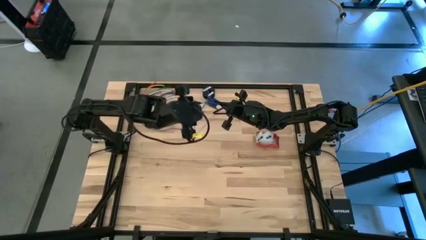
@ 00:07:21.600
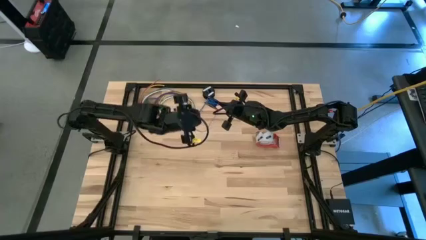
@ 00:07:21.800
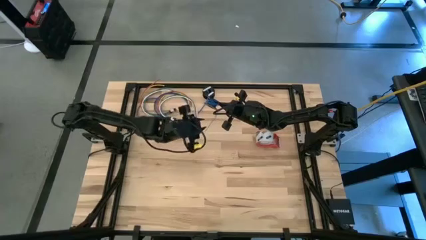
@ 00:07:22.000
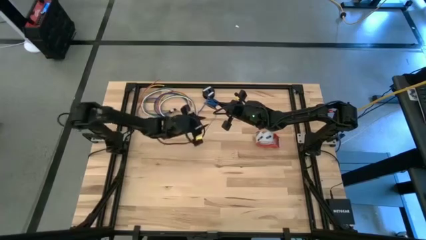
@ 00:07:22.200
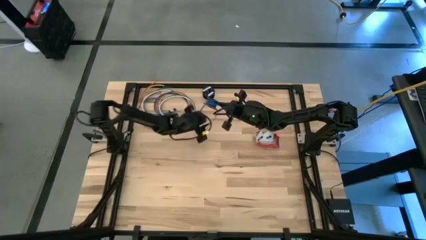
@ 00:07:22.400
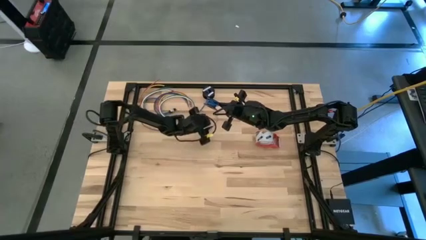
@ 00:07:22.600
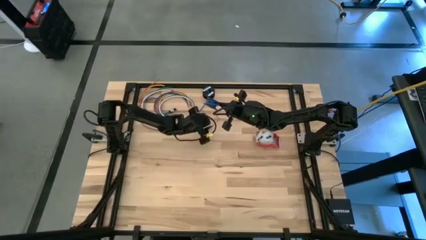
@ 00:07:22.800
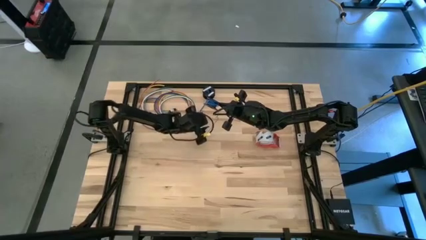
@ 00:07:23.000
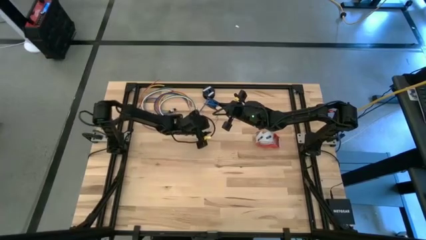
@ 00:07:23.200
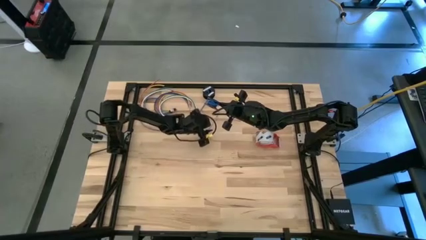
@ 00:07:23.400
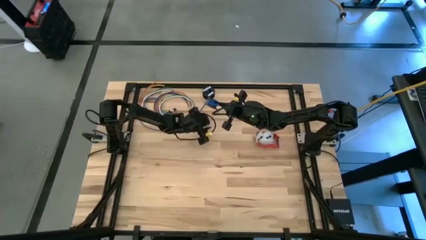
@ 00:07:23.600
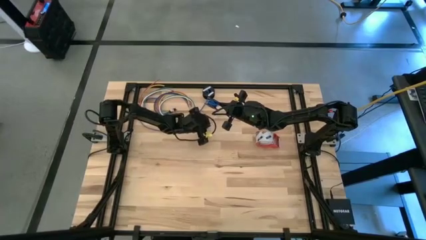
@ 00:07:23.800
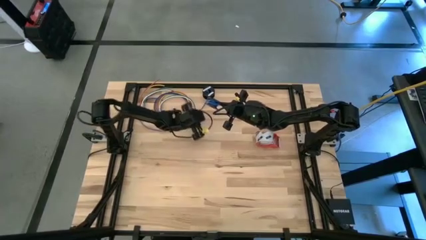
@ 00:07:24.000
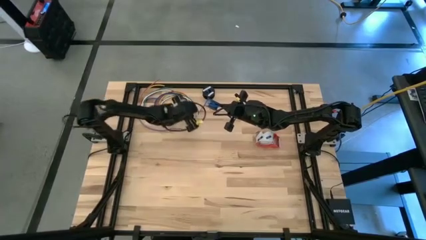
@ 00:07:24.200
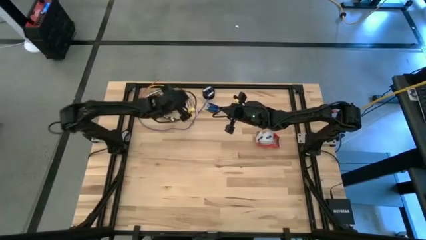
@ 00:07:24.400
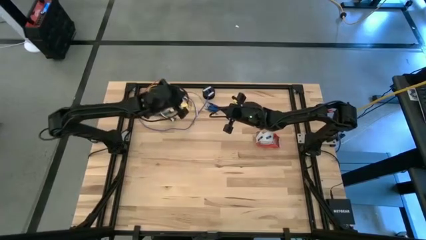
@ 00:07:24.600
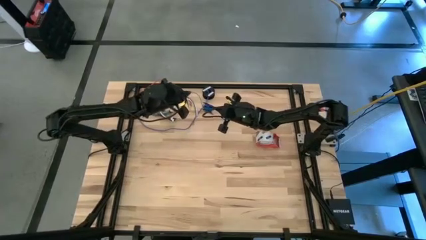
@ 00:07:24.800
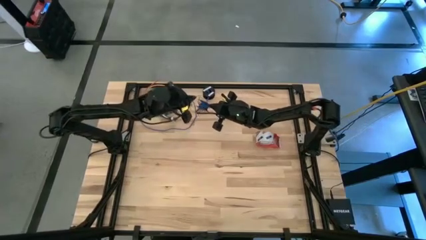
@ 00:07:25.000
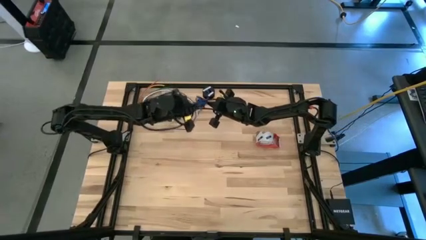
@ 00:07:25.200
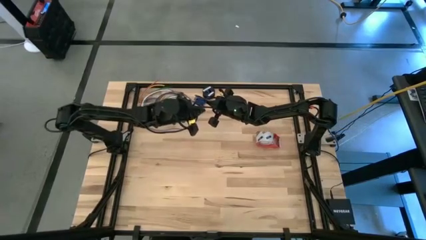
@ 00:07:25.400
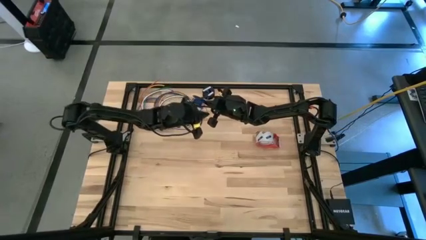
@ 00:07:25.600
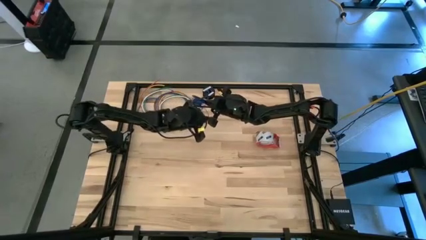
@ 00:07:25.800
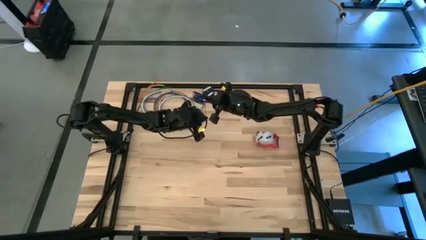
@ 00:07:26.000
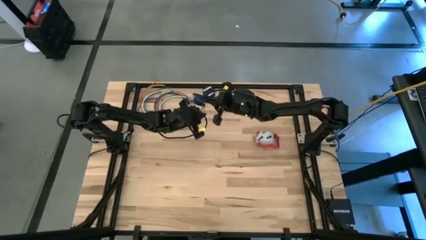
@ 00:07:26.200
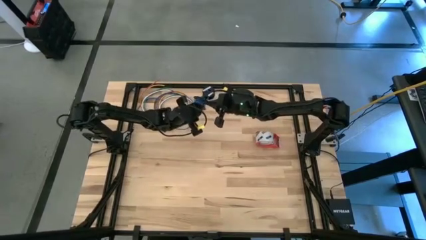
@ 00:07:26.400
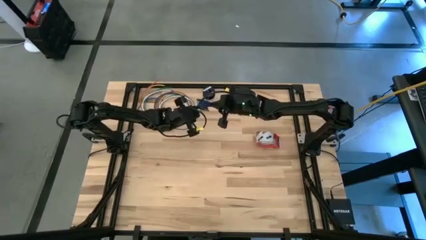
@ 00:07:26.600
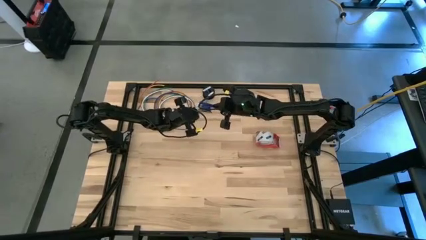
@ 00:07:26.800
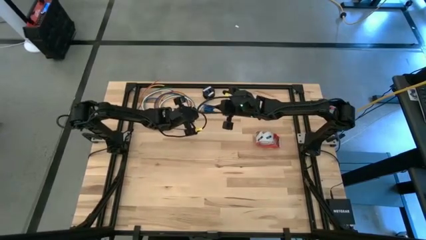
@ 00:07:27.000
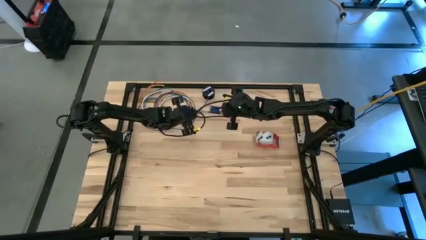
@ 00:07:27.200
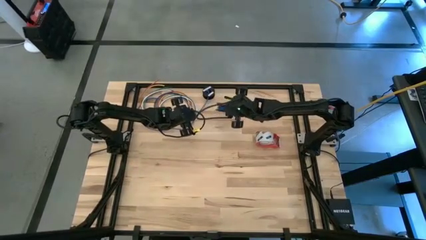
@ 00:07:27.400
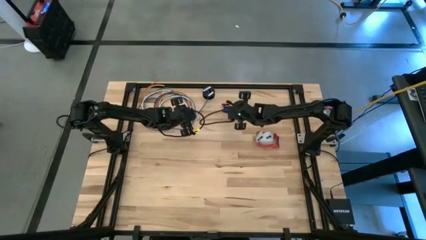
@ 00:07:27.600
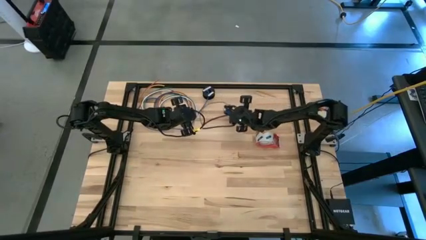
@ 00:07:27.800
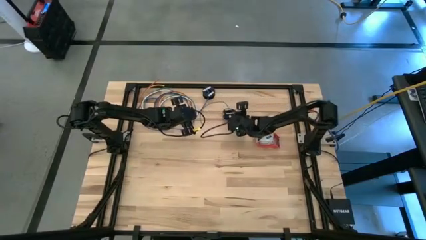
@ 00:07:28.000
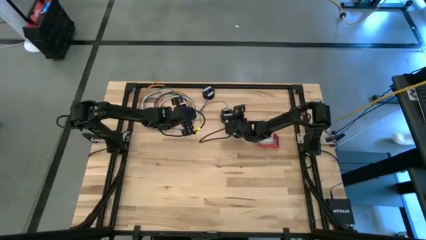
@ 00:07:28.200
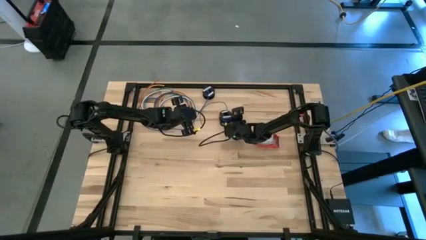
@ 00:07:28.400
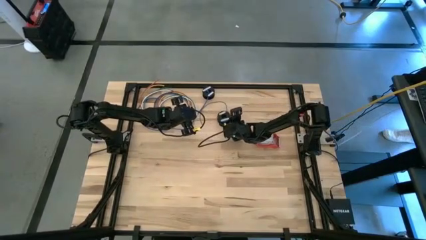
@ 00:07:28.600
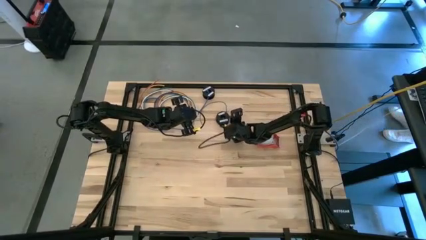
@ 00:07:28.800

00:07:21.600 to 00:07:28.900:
Task: Coil cords
Coil the blue wire onto the spool

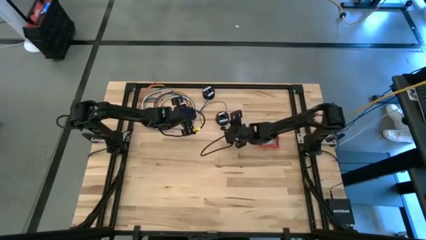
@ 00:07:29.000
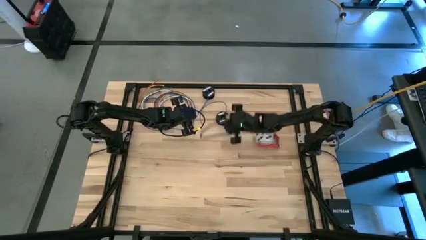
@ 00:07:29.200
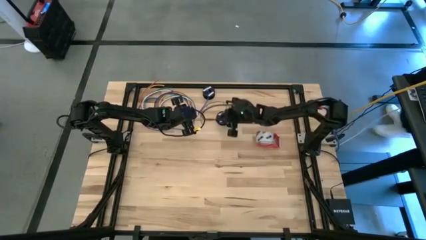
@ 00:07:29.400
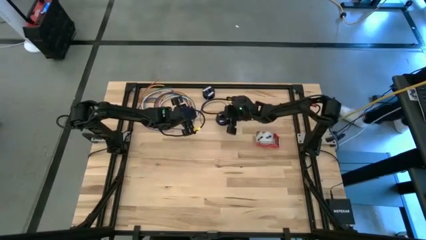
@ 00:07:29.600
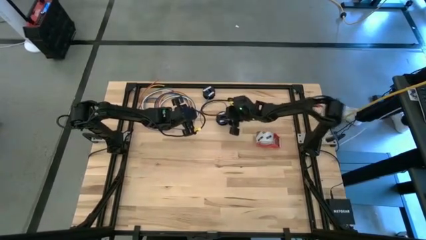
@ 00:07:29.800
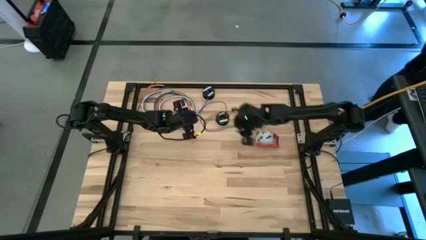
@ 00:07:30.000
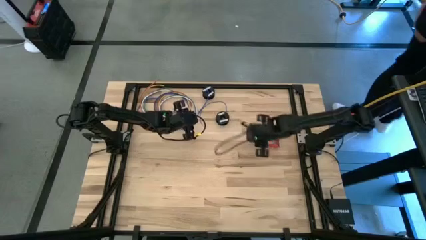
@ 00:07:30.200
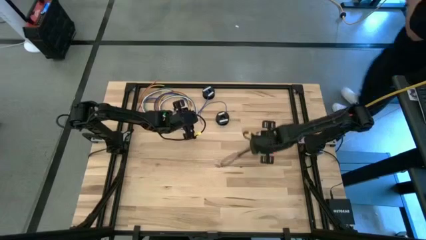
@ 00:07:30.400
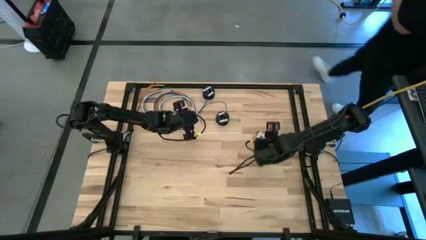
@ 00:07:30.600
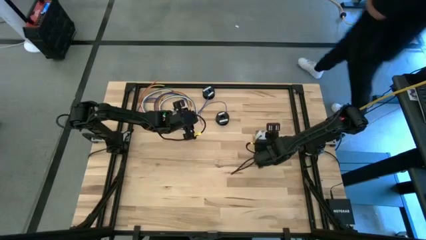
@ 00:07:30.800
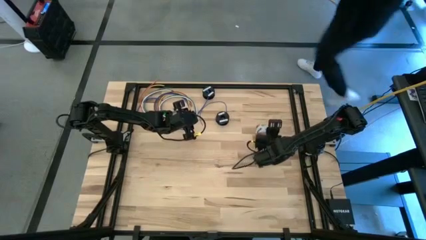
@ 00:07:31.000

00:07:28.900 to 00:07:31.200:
Move the tape to the upper right corner of the table

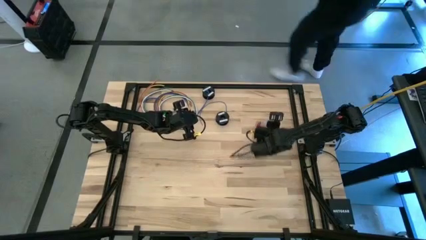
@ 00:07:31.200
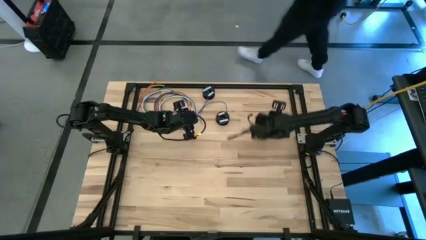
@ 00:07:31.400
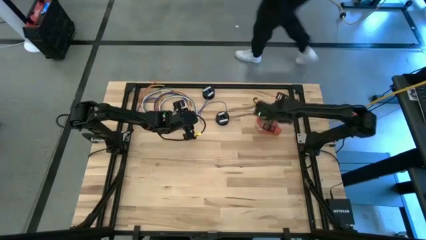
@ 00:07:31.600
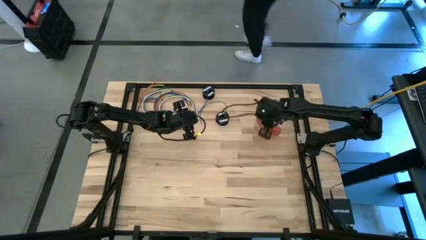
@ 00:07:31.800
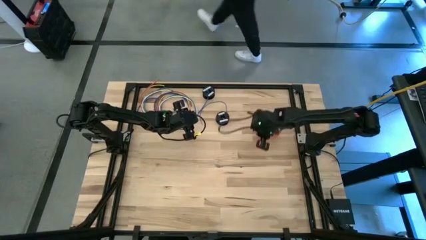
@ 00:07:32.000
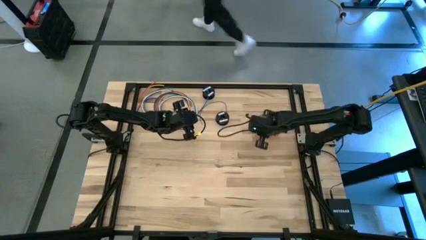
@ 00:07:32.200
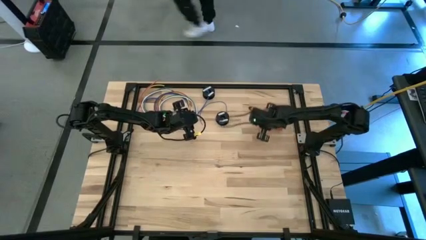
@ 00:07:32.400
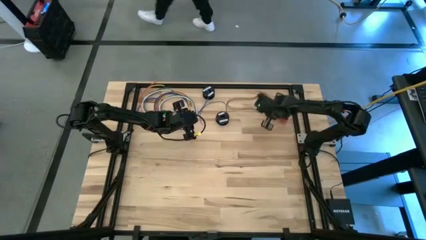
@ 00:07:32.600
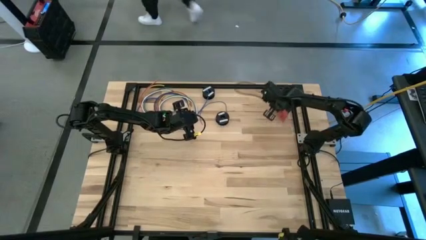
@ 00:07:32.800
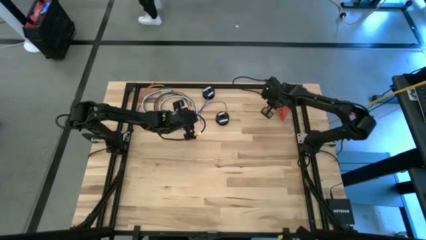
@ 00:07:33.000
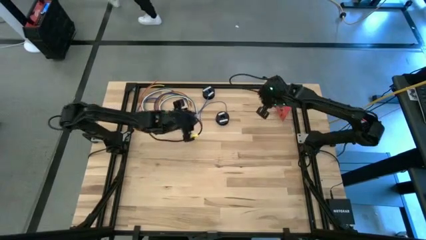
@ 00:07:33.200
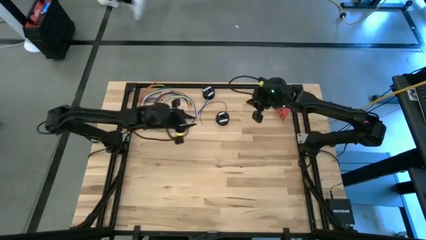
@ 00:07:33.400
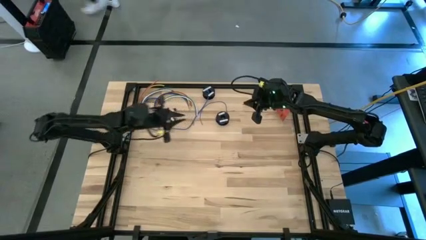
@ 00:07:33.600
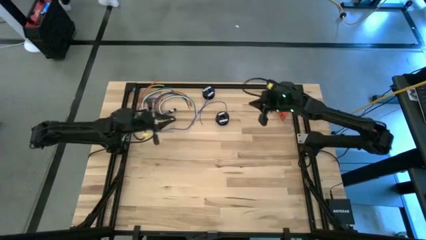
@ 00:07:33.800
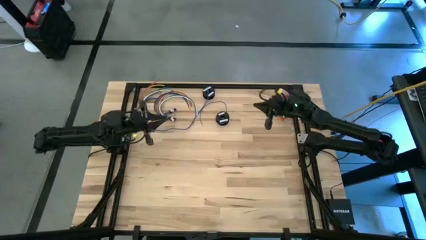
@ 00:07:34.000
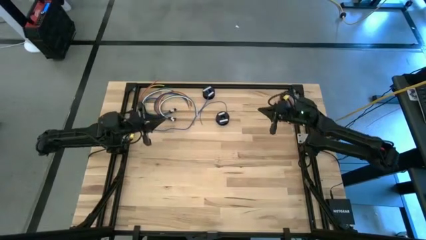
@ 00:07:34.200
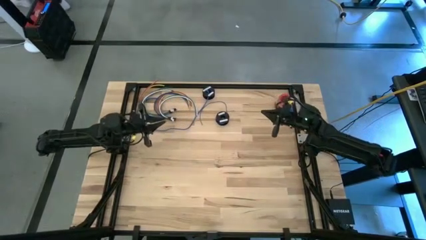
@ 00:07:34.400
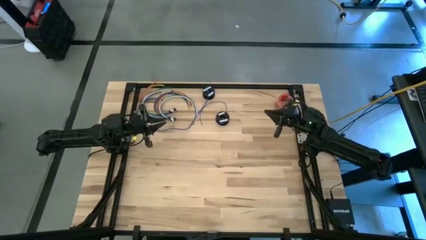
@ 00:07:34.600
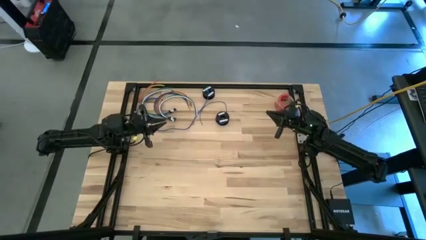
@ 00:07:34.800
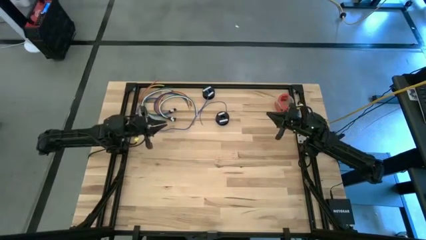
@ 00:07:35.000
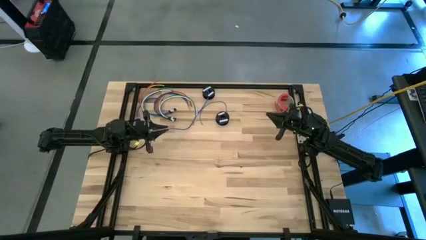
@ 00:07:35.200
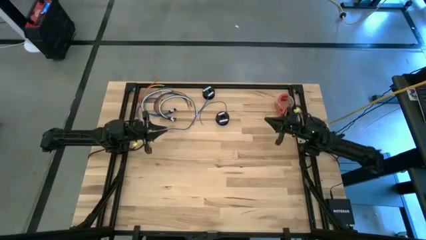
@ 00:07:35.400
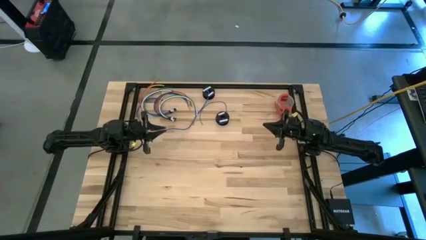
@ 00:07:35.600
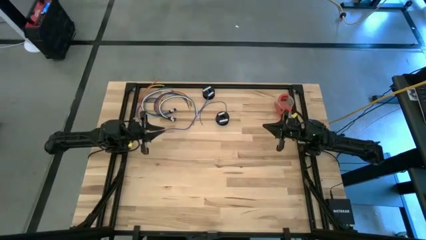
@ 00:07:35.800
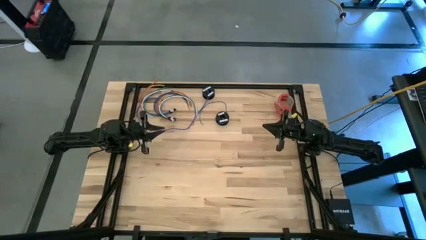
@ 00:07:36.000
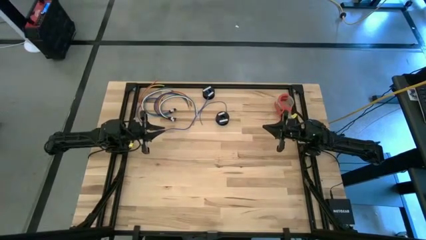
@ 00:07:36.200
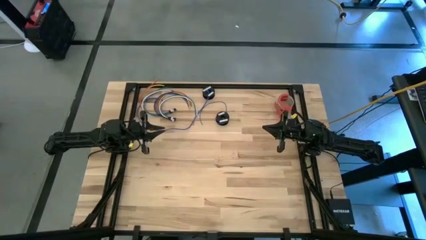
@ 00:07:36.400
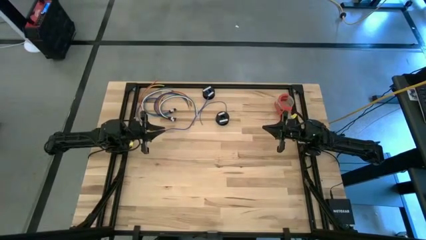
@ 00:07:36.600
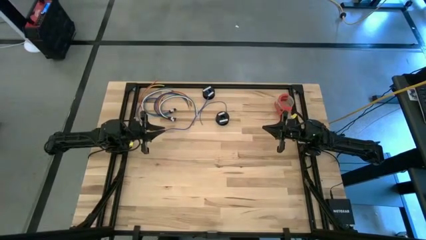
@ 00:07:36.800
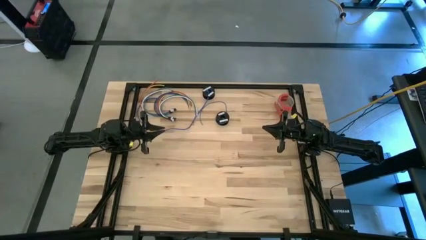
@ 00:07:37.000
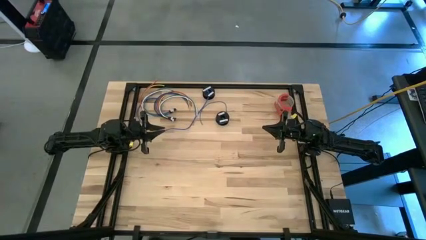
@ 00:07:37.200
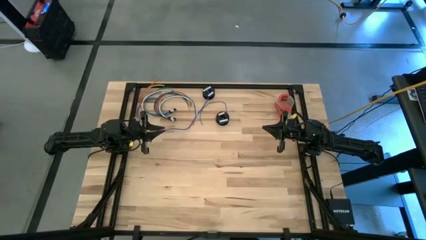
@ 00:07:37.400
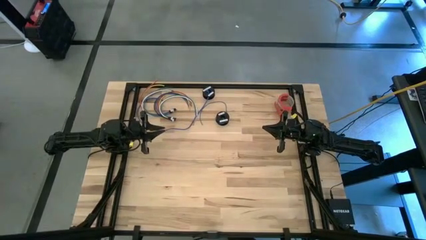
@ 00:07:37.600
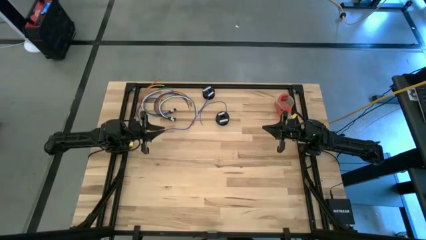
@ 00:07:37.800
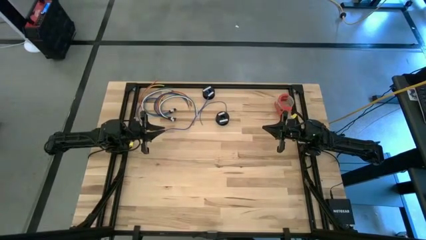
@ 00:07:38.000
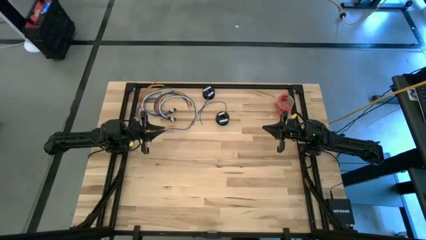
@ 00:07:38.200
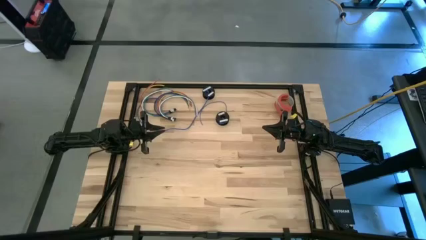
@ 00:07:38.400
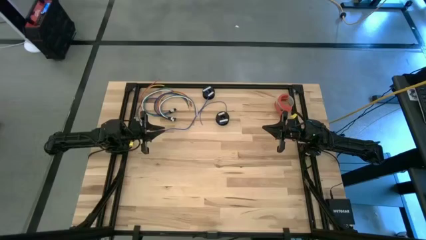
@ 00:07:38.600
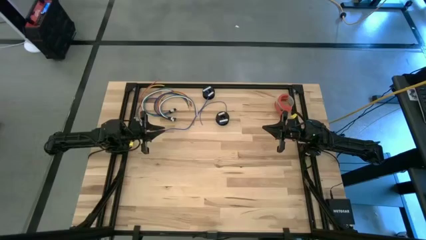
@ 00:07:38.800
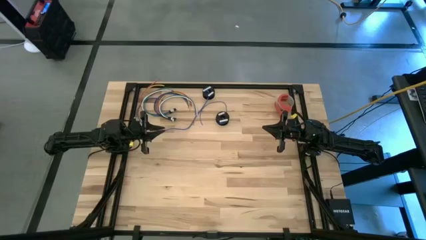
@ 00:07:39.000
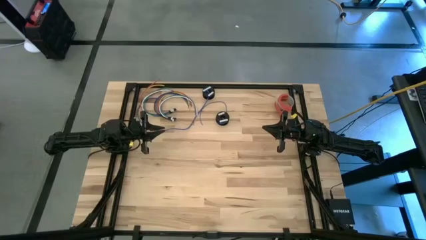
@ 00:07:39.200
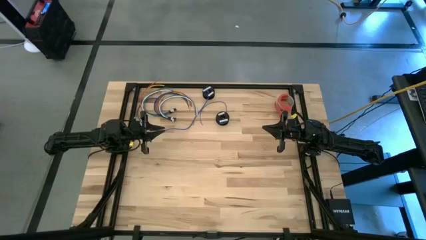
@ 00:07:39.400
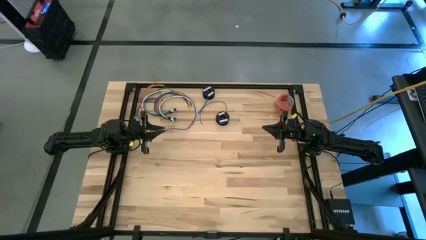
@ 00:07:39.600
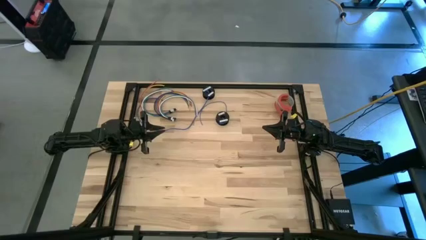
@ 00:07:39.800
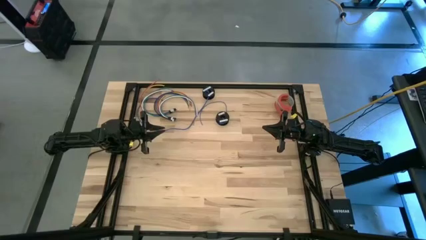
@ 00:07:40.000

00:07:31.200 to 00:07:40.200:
Return to Home Position
